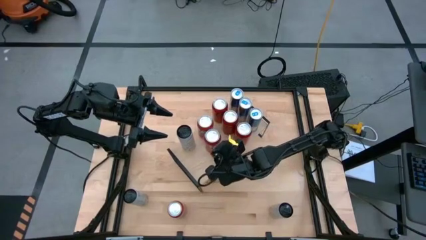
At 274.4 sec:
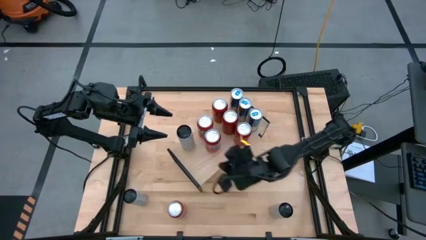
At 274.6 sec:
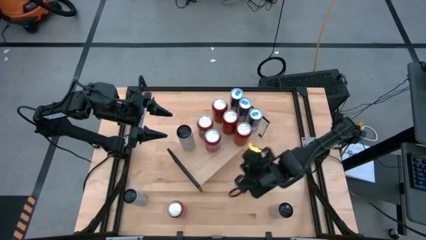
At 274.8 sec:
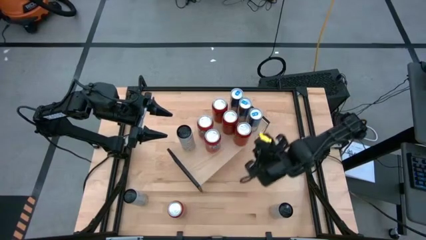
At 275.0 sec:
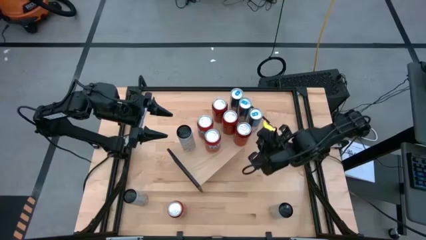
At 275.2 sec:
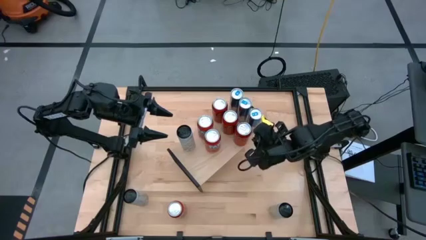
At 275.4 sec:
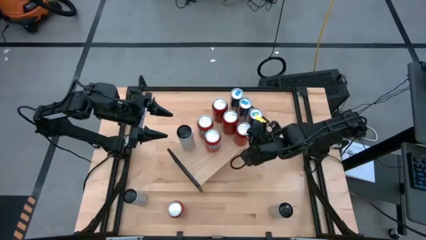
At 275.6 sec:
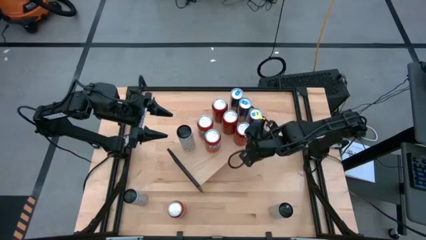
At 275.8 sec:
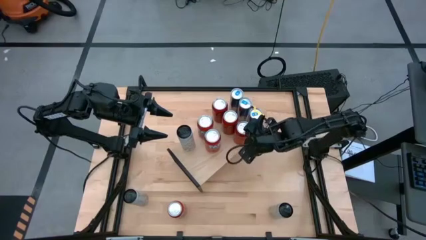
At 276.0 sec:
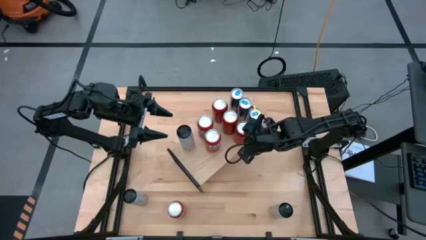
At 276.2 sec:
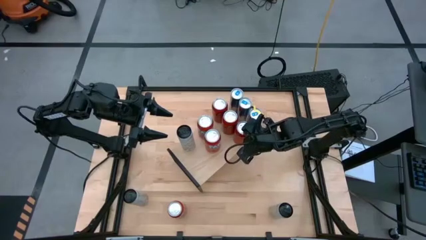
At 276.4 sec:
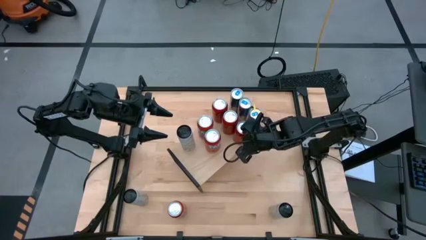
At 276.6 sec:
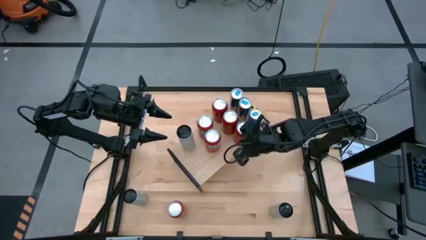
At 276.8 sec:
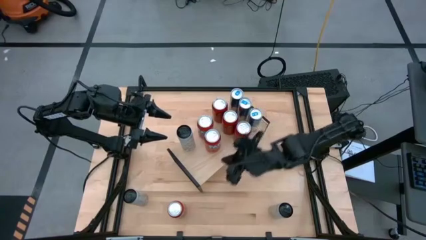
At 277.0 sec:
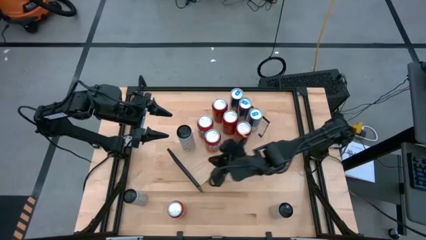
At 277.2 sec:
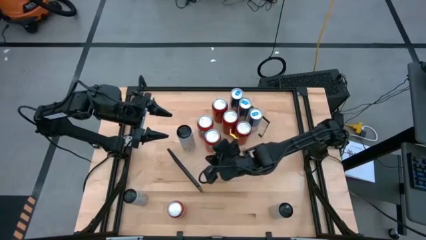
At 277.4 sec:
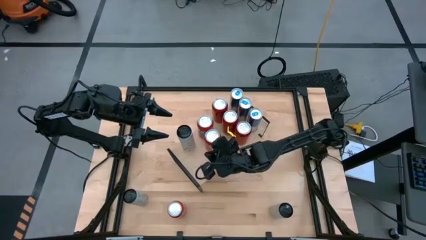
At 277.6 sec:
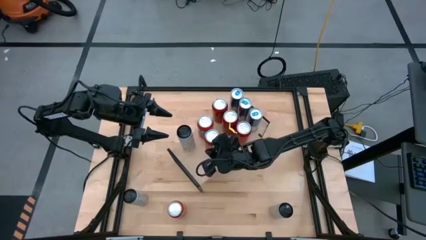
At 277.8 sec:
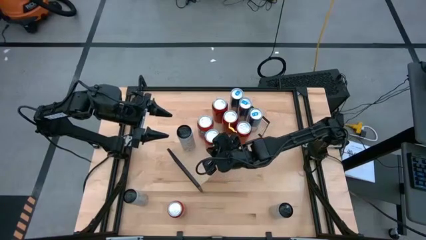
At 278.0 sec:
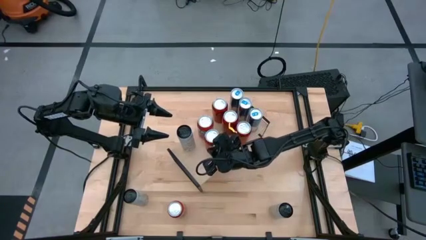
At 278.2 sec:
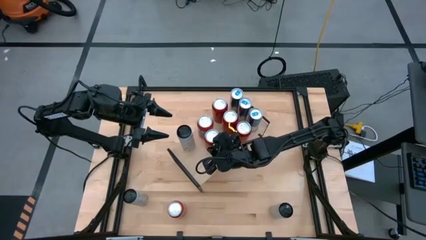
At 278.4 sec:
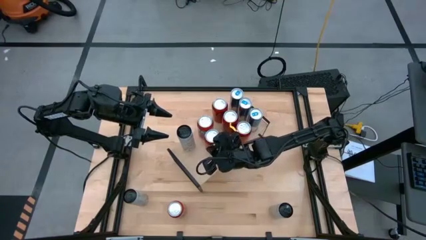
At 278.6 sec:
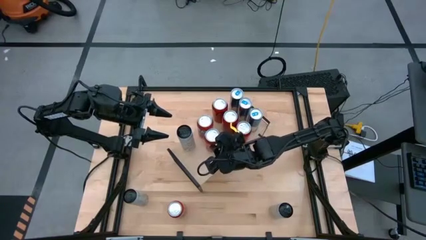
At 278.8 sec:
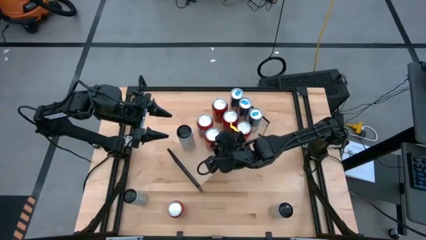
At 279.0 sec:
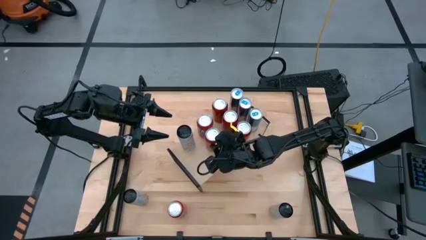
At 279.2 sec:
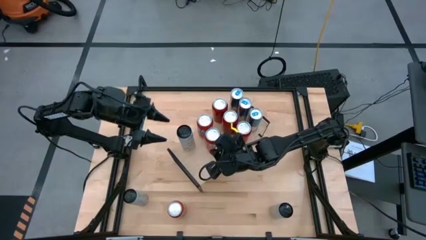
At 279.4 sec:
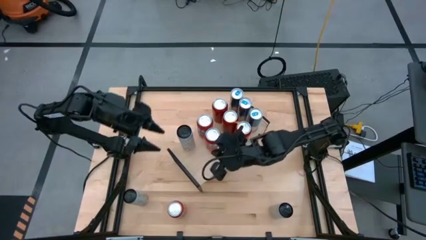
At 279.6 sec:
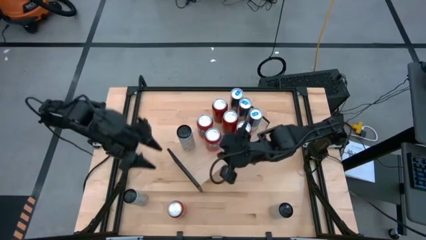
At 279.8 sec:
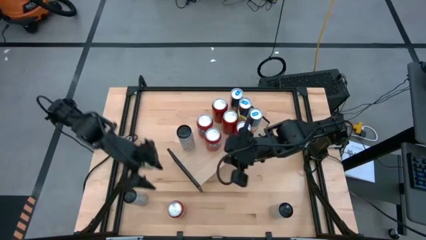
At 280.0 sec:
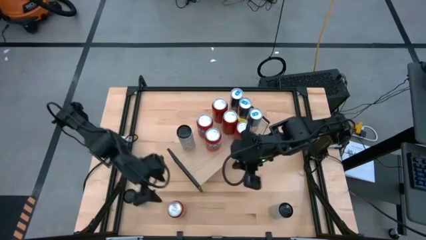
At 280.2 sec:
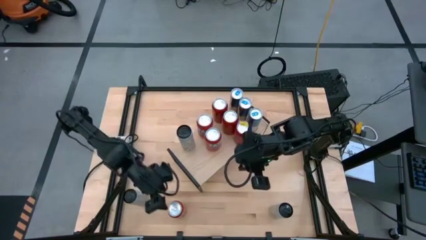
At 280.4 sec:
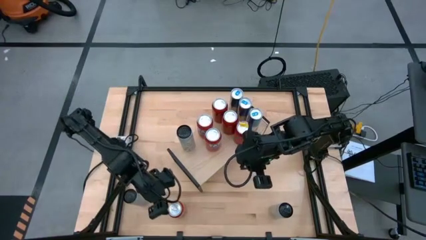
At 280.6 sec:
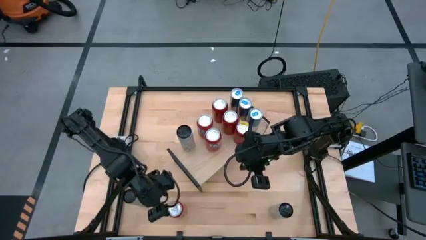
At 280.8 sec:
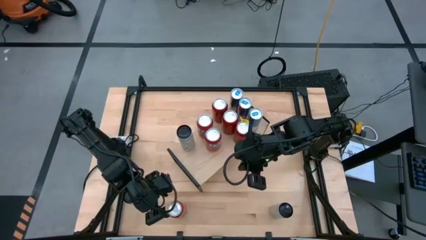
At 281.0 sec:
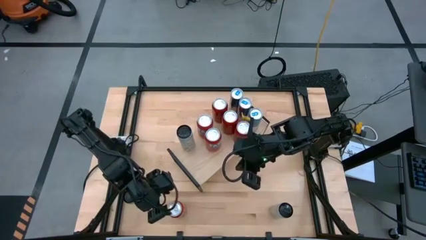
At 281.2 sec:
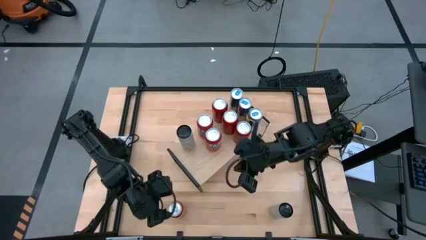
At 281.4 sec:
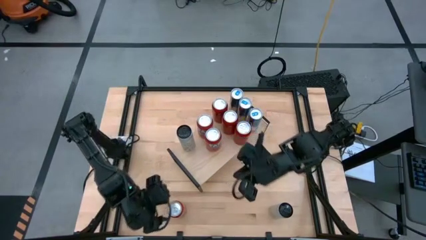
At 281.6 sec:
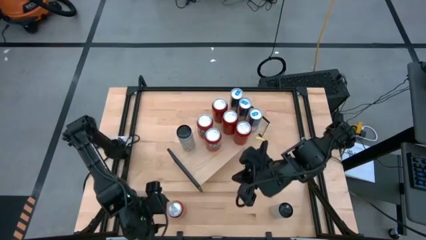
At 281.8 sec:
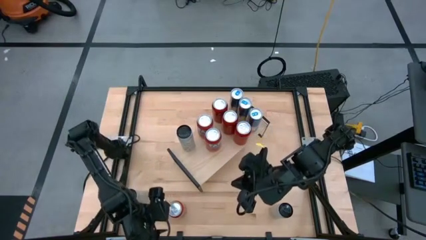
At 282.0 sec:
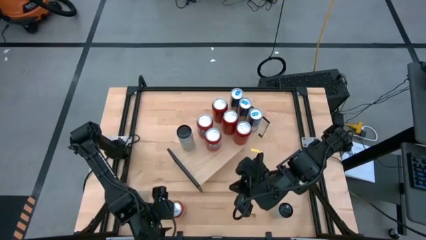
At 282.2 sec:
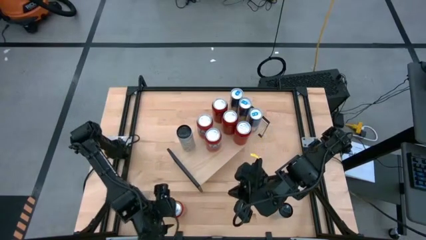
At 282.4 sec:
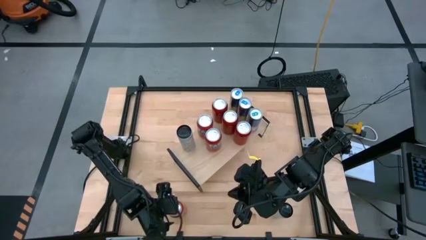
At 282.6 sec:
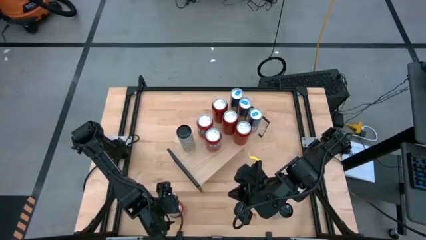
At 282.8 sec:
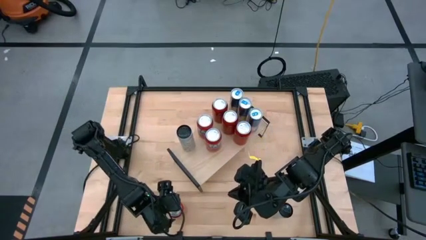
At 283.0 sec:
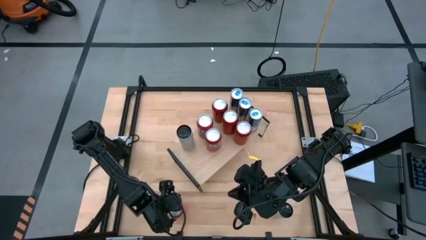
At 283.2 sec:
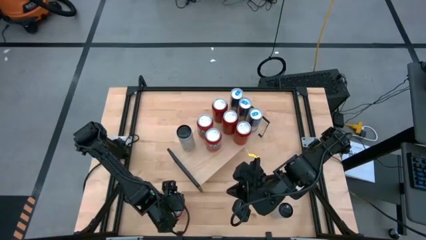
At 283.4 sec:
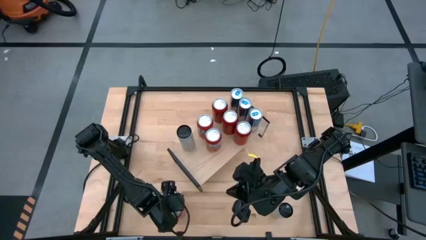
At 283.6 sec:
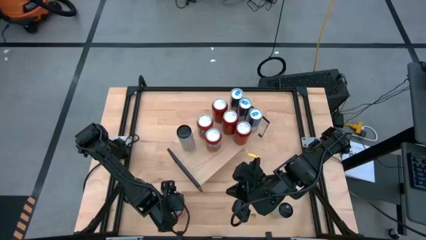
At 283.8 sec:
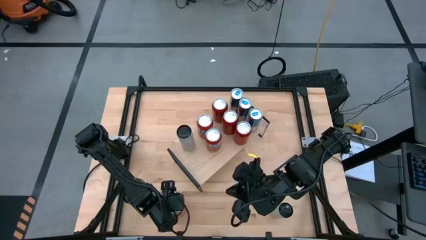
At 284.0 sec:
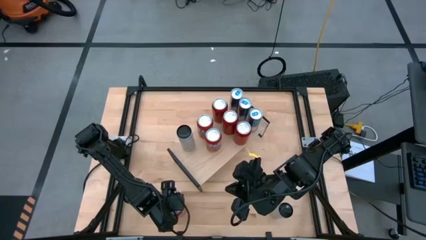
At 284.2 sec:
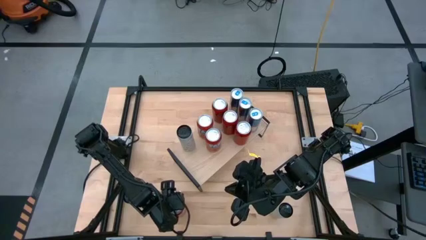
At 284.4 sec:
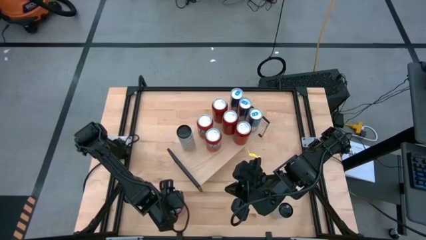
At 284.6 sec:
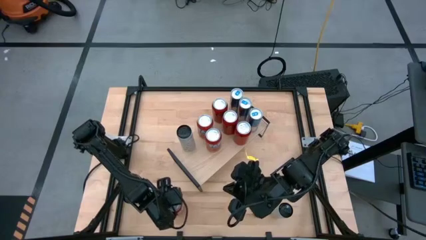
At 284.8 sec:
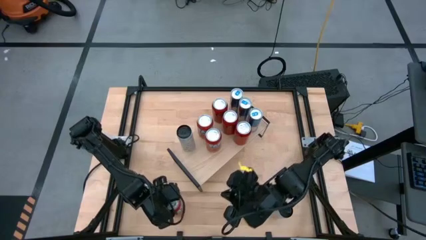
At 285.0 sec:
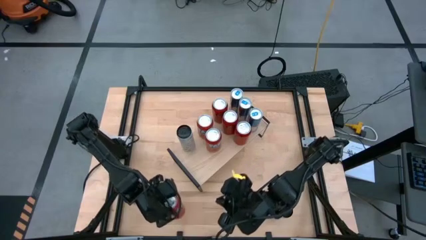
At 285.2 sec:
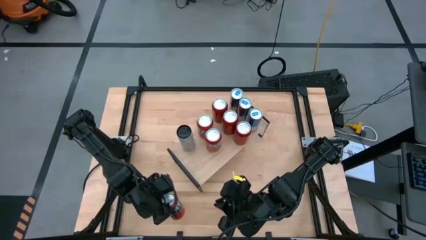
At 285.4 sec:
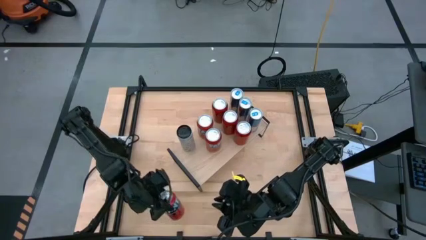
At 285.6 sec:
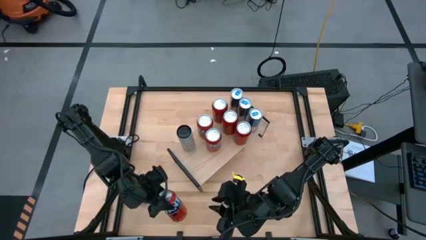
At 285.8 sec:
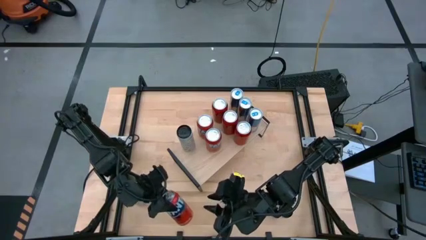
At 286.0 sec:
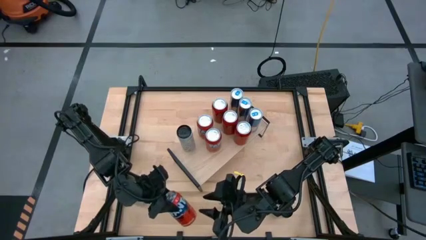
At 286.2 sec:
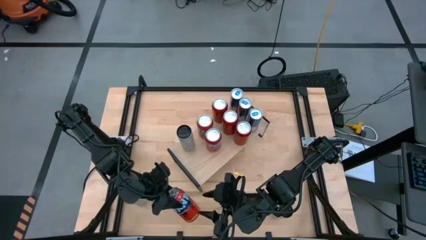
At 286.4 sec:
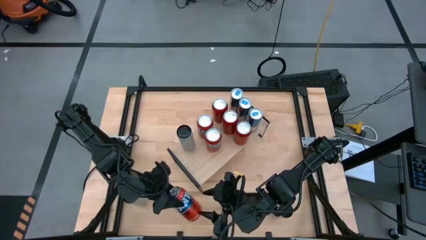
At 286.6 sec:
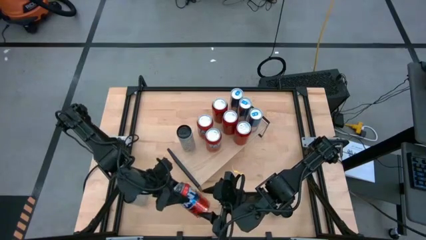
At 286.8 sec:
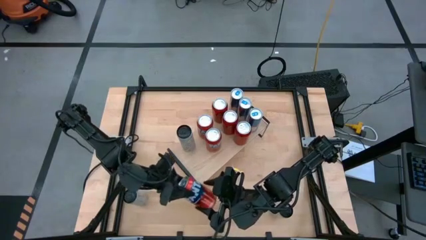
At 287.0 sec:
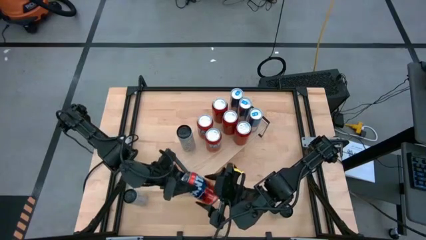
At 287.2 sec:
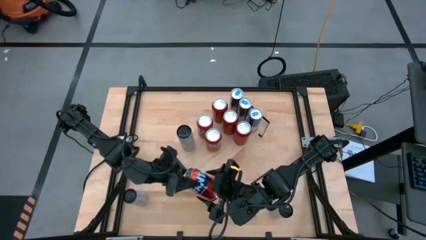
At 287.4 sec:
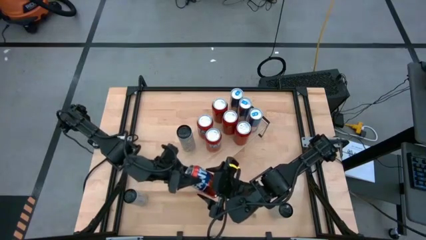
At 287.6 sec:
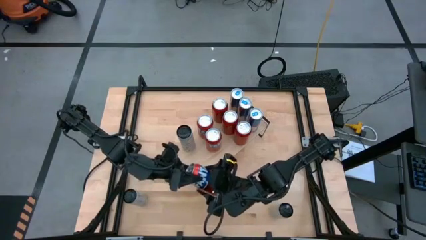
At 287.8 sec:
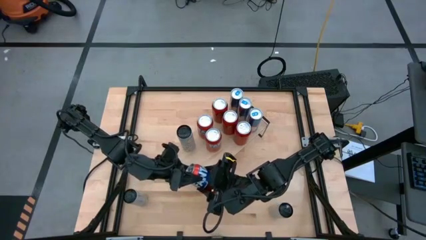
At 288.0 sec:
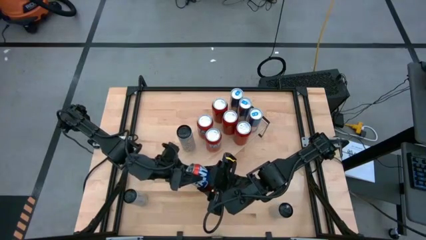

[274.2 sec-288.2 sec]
Task: Place canned beverage on shelf
Put the orange soda can on the shelf

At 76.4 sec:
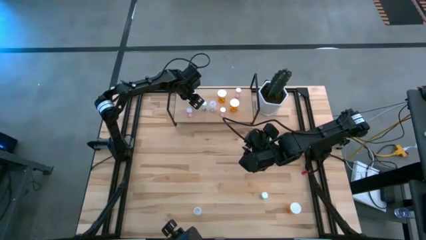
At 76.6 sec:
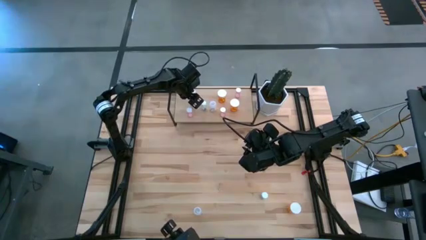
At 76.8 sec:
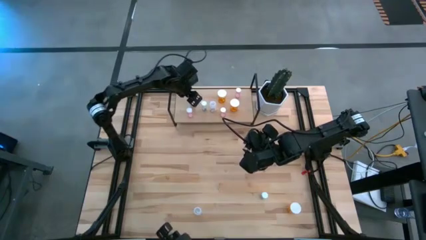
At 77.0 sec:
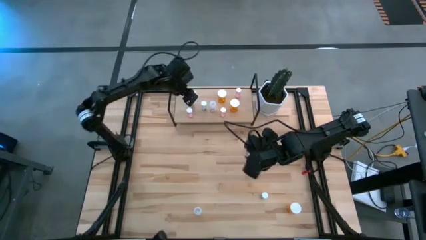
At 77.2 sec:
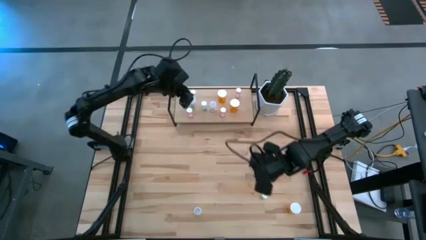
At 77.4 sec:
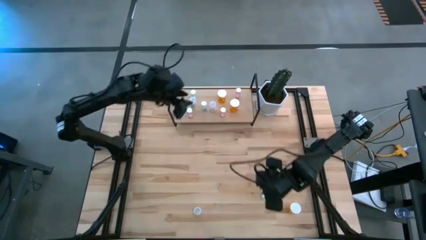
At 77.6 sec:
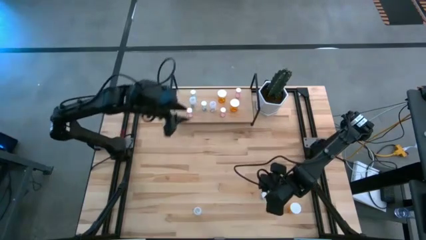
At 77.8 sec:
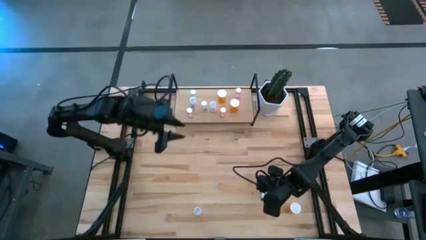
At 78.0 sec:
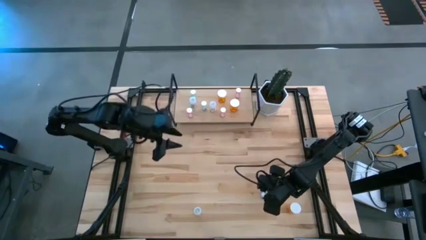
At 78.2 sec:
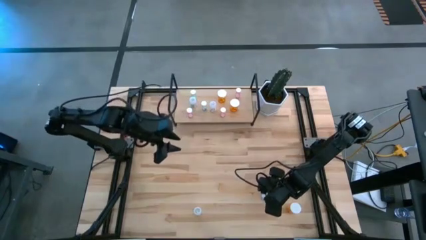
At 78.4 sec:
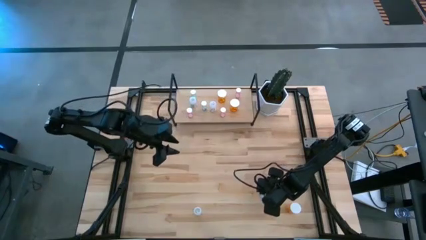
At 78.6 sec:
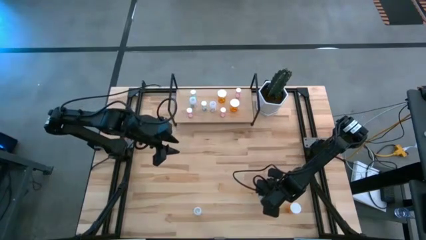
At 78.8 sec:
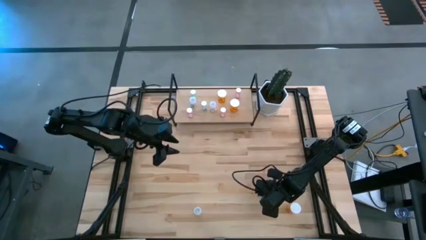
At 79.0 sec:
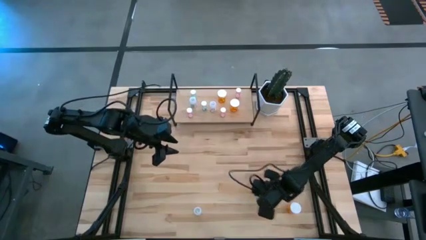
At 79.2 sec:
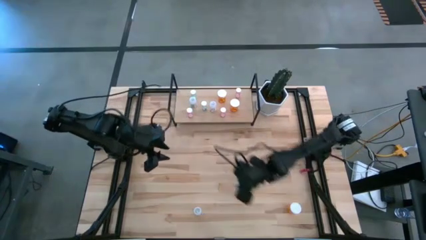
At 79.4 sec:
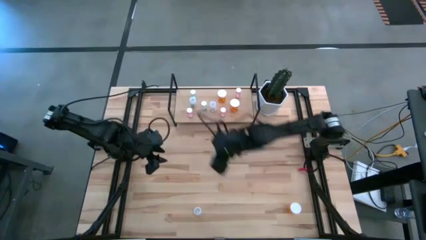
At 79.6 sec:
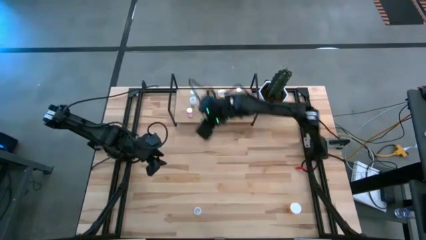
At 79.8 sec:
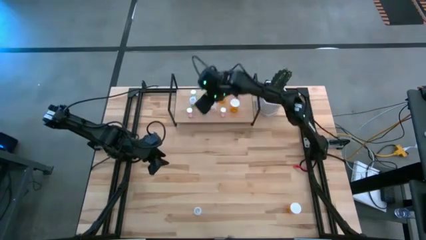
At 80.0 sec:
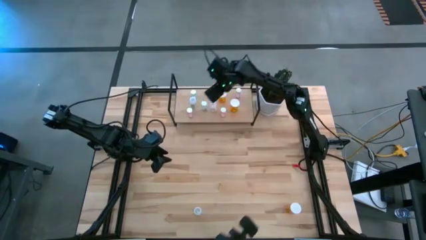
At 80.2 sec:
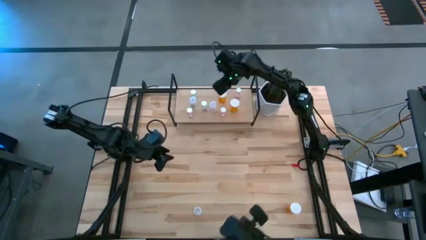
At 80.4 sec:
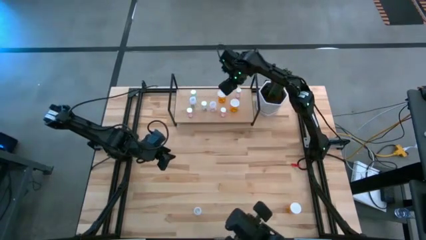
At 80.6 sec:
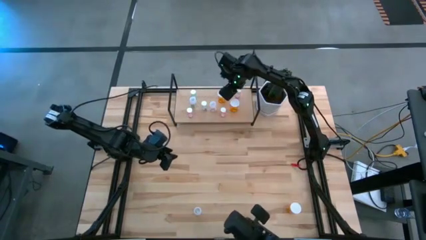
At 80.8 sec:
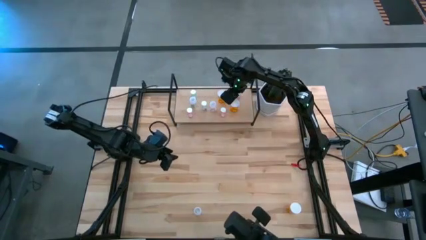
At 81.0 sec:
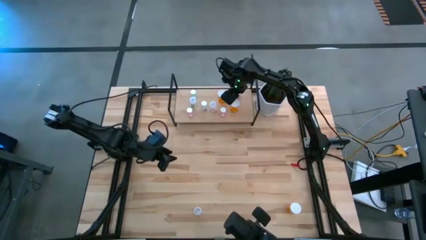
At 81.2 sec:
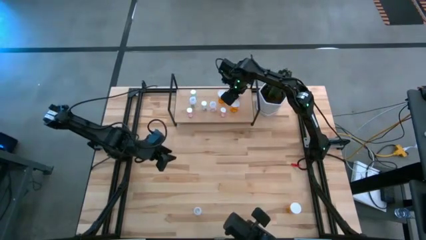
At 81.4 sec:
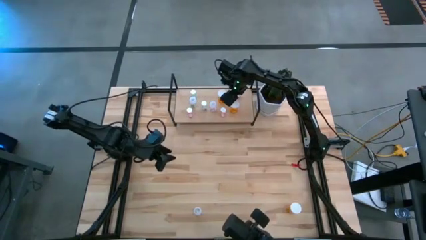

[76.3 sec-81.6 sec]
Task: Pick and place medicine bottles onto shelf by color
Put the blue pill bottle on the shelf
